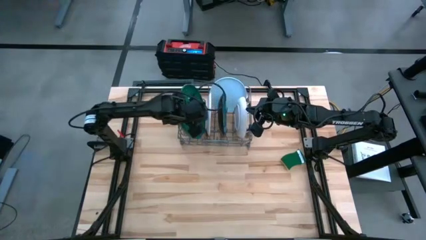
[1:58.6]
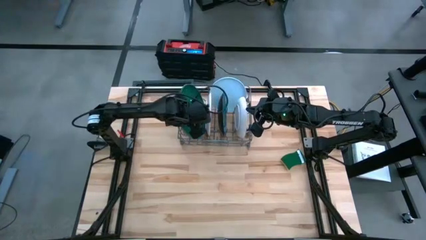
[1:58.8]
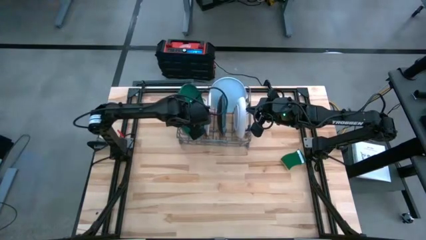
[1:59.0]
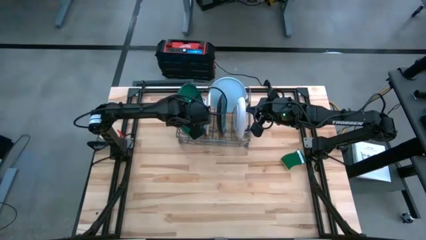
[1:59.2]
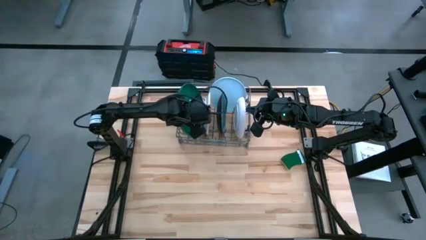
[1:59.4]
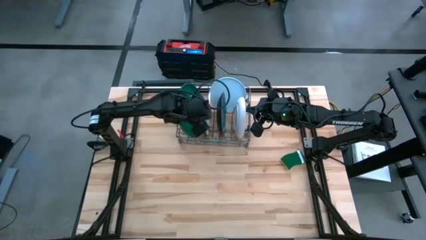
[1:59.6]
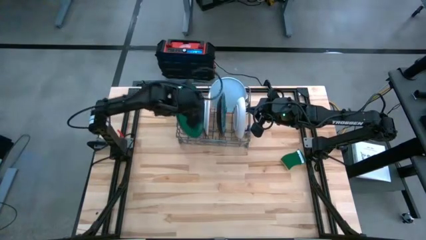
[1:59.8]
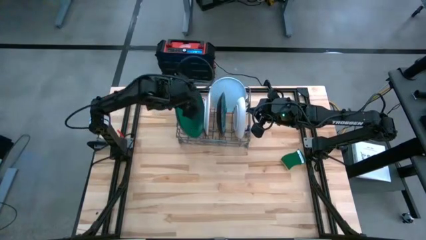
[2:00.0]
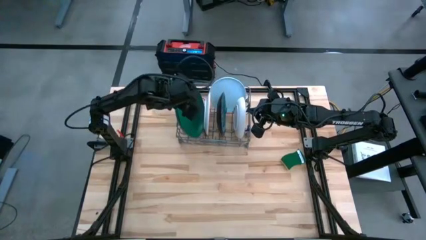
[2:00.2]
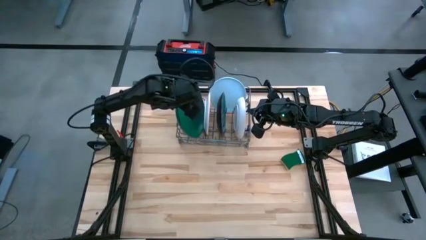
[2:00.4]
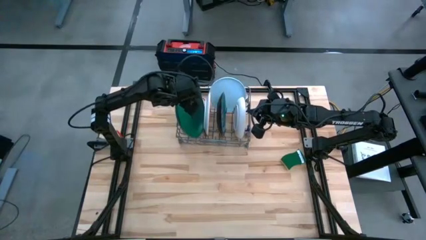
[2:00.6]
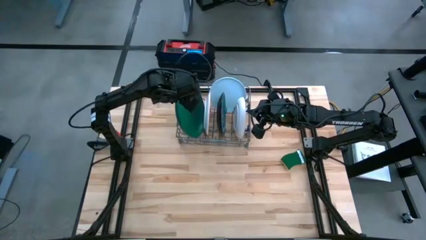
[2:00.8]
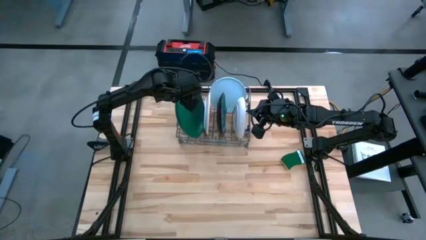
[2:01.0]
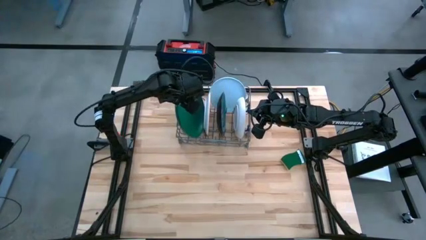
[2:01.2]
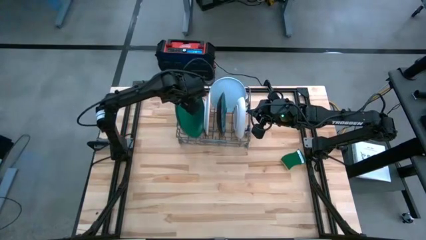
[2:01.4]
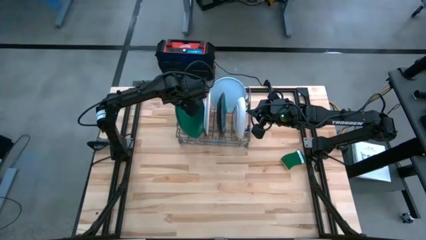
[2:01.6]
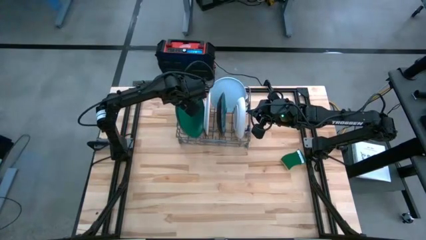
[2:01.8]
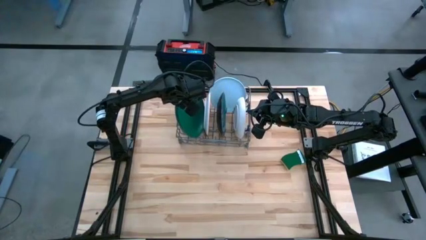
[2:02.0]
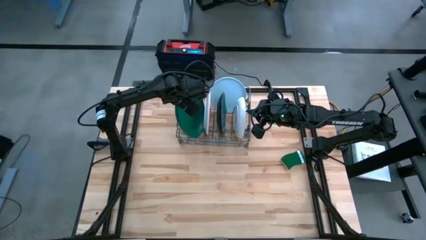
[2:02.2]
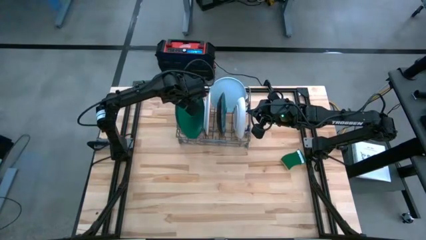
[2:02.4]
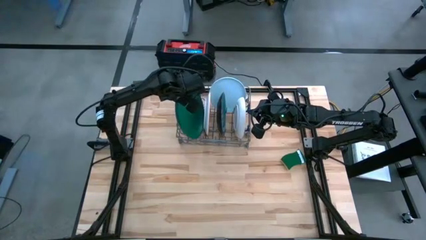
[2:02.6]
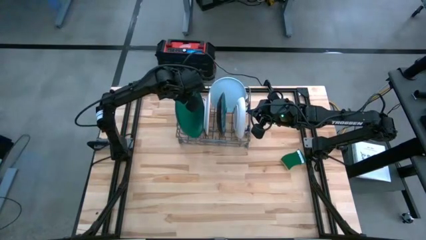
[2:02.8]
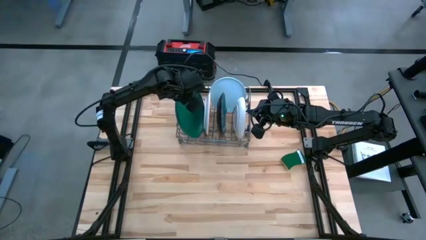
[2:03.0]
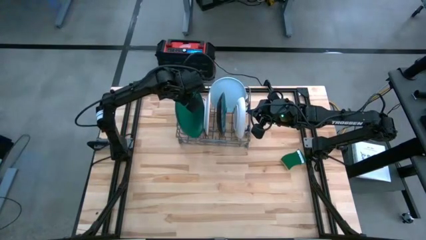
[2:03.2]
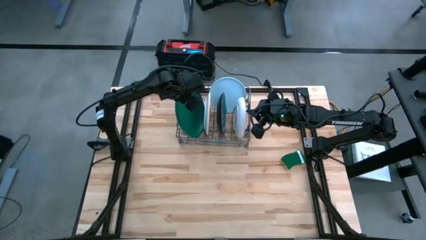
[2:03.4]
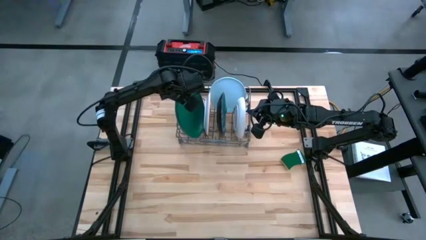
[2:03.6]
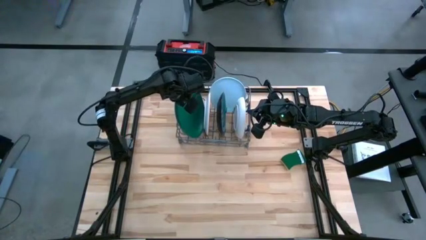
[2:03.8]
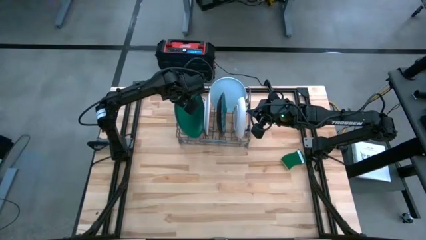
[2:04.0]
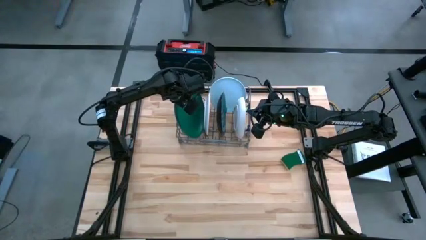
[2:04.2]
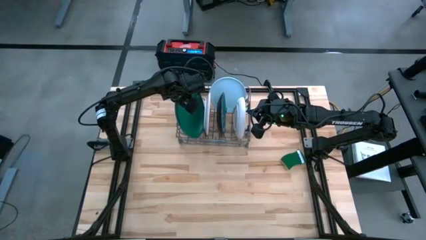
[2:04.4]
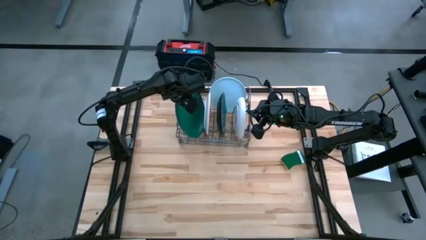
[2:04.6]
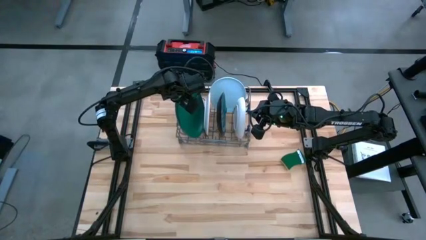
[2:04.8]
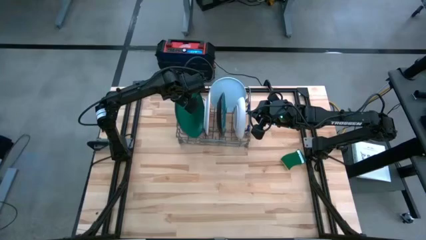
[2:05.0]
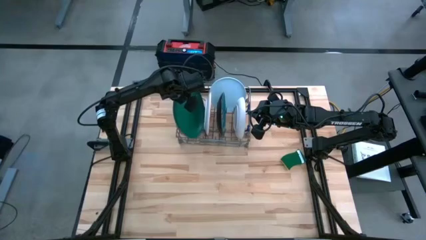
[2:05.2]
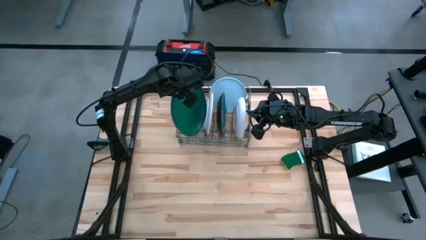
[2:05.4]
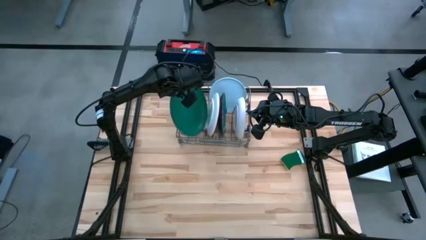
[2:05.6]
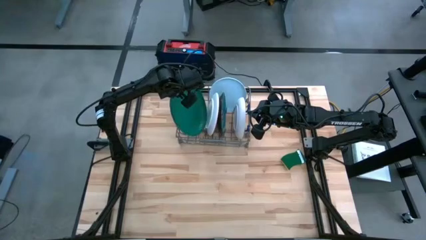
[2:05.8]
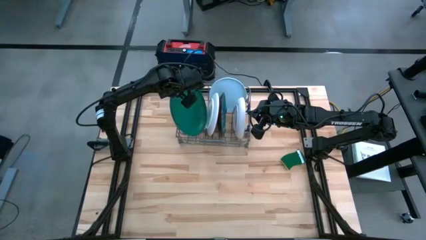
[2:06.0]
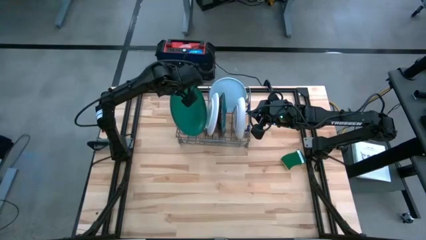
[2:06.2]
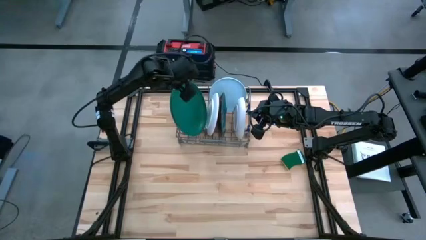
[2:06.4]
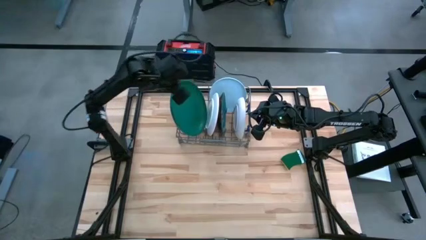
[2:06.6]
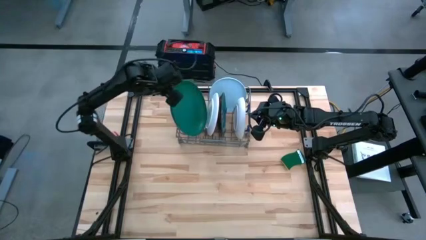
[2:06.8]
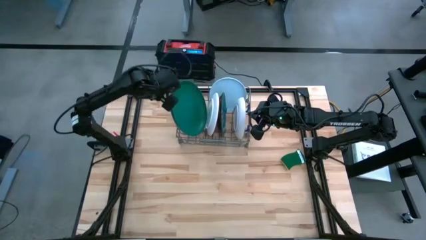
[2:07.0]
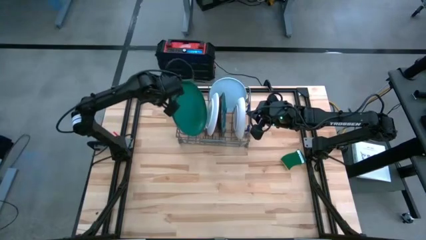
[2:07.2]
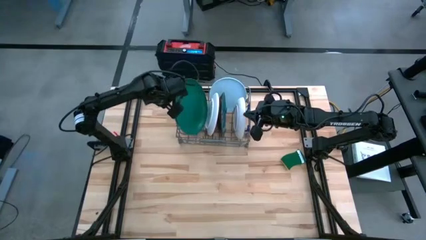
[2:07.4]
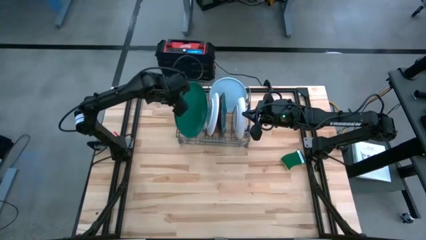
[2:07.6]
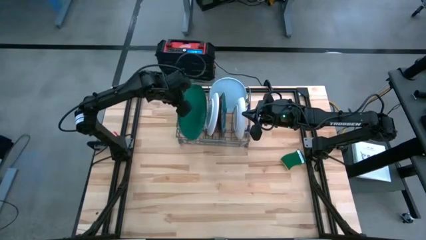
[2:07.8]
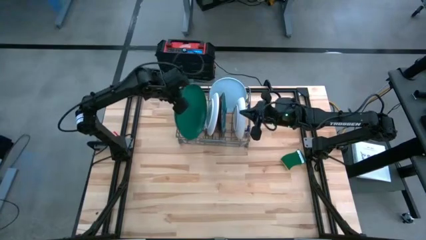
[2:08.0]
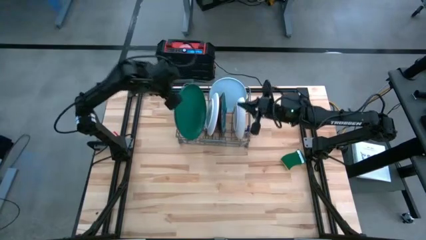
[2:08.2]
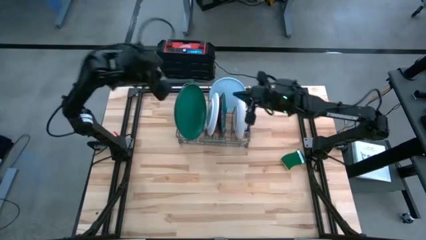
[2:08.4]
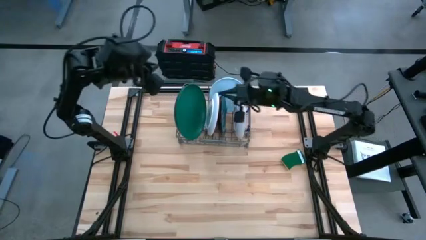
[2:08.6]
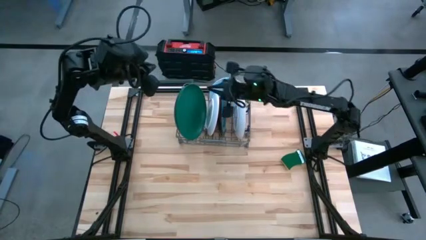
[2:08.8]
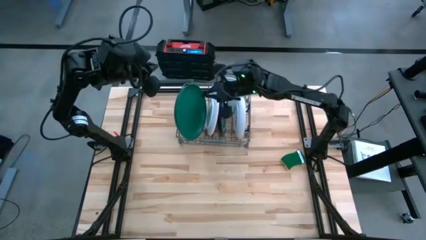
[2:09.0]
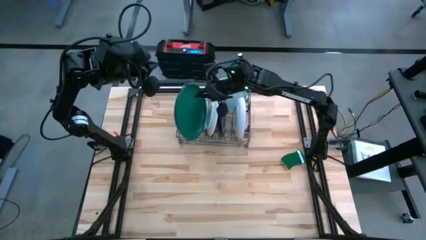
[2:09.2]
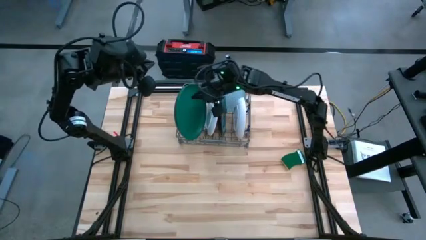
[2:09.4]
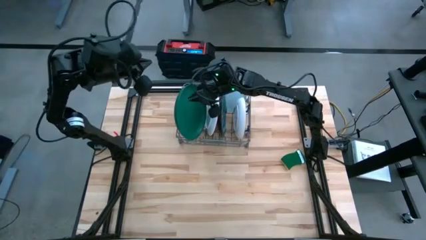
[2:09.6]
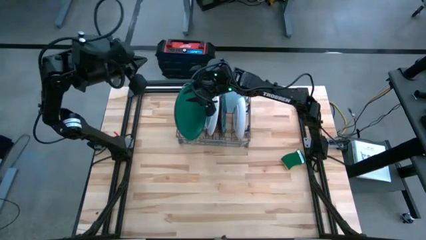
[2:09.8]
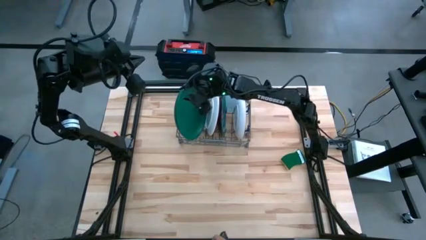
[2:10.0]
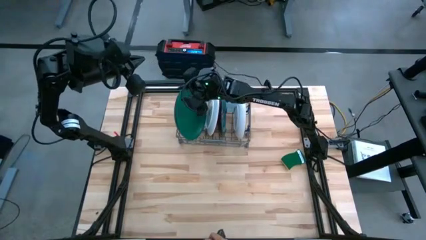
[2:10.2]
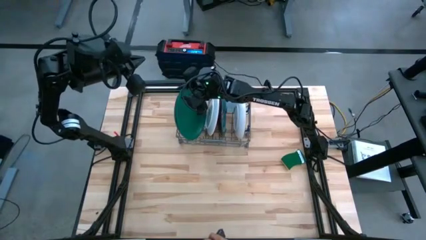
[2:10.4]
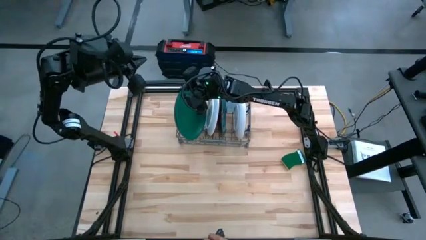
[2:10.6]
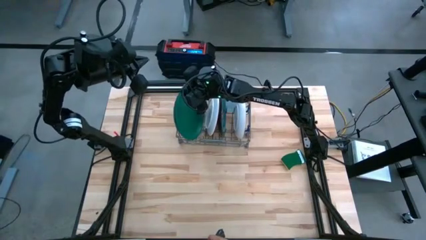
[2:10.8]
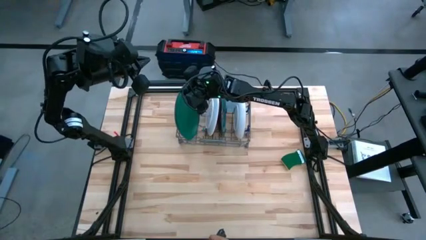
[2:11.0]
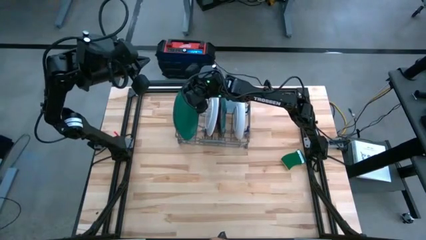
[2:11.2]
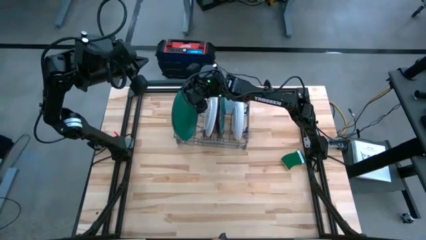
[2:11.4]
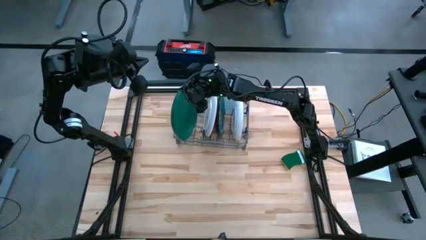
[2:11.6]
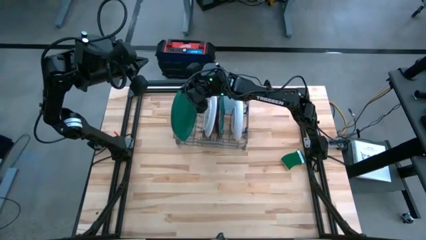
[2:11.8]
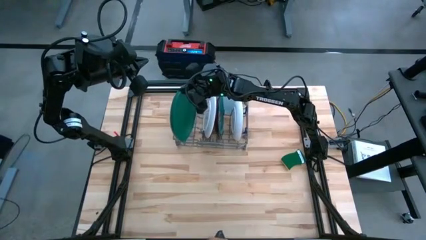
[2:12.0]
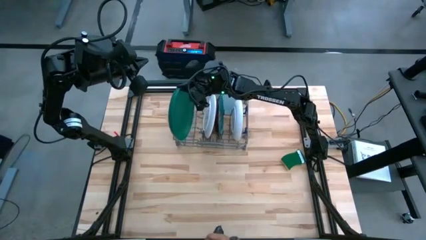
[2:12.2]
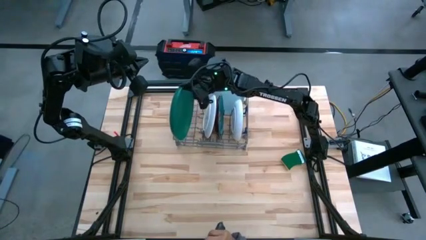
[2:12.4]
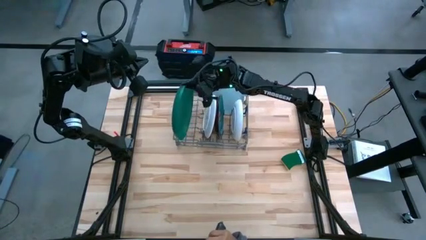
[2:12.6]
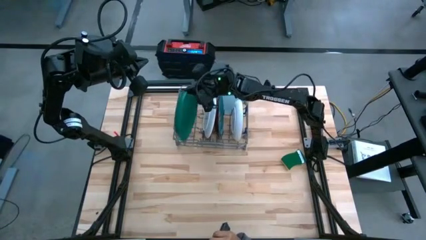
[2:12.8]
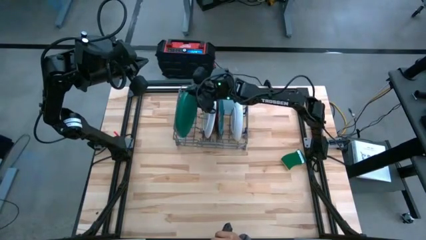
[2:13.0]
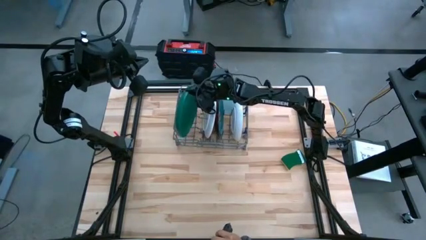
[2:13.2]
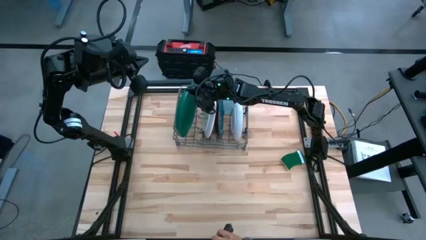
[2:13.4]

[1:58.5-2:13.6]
Task: Sort dishes
Put the dark green plate in the dishwasher rack

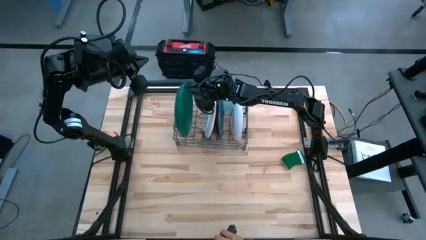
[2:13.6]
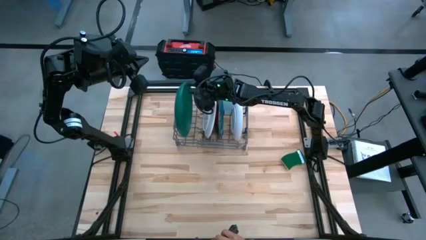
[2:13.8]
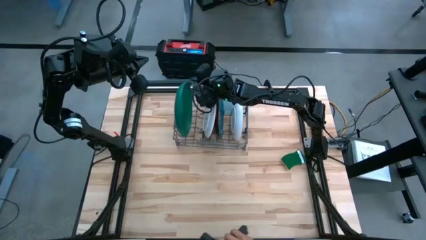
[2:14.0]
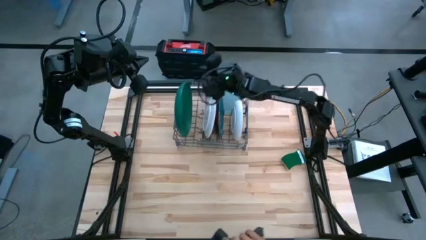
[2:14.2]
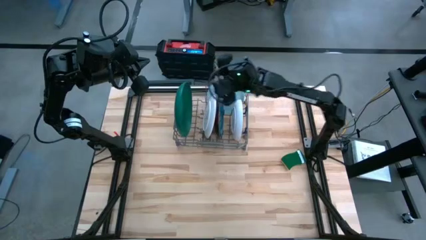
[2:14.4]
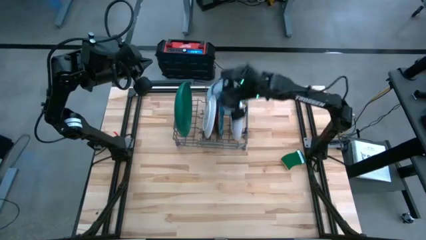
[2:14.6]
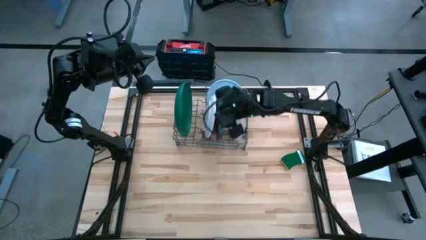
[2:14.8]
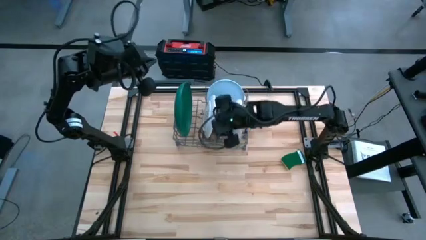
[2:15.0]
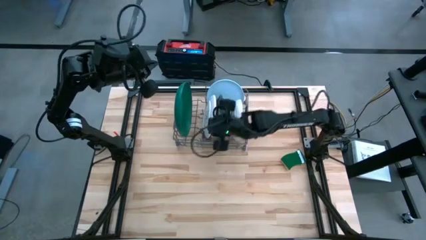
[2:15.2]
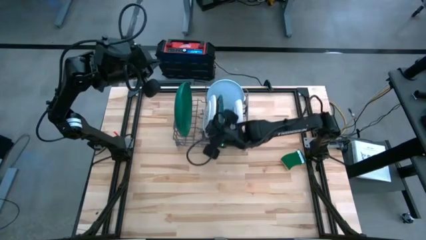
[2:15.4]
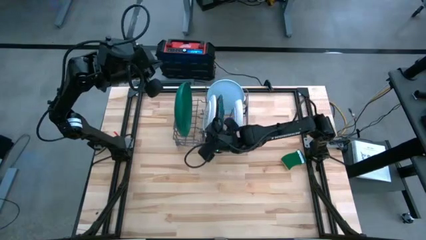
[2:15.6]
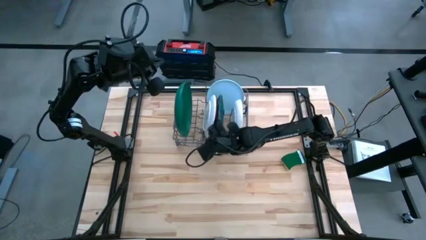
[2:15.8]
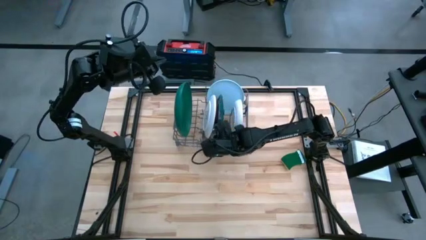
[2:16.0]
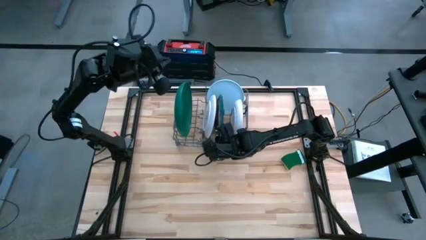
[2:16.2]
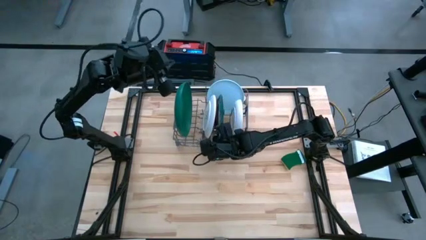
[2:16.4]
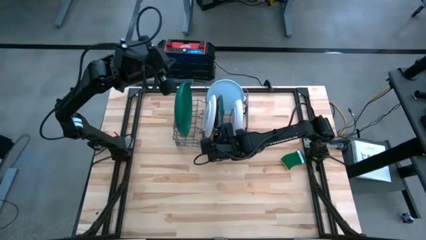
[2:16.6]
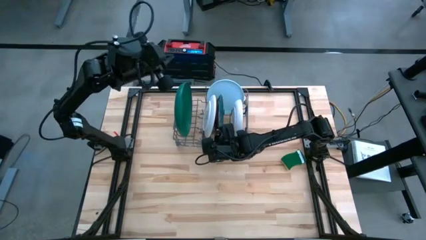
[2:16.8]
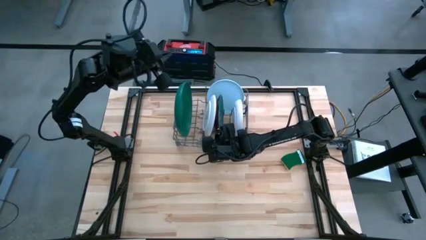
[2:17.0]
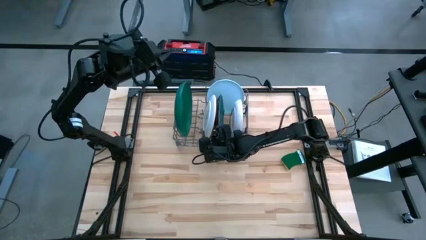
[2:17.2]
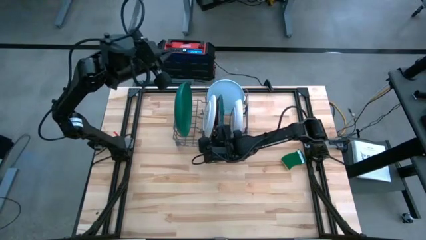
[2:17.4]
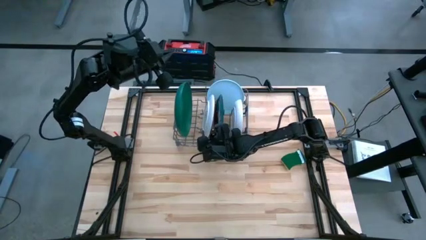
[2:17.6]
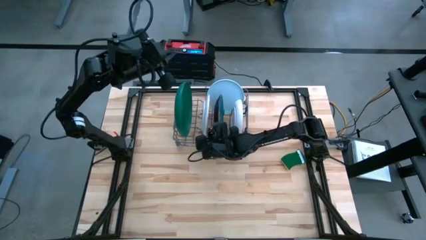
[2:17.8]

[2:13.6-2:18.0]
Adjust the white and blue patterned plate in the dishwasher rack
